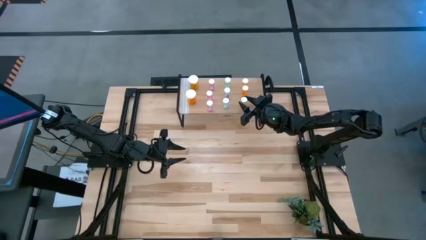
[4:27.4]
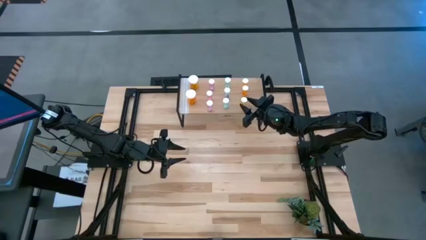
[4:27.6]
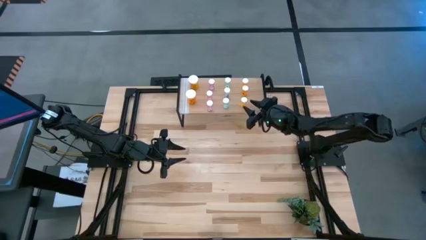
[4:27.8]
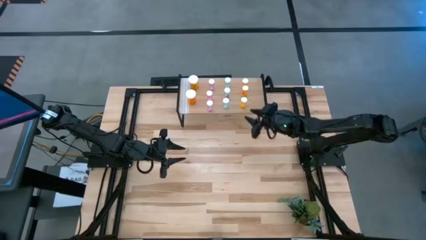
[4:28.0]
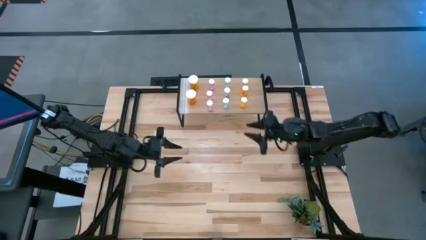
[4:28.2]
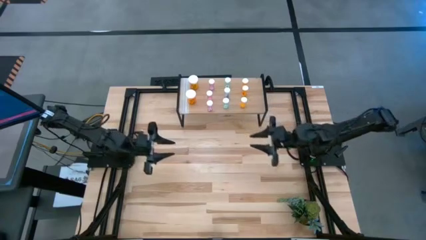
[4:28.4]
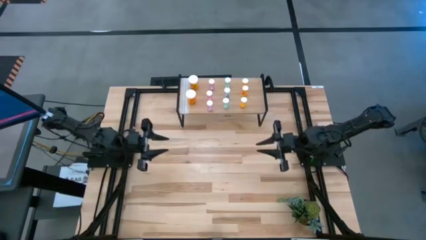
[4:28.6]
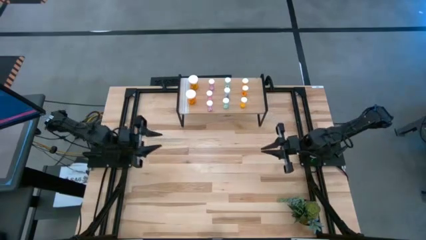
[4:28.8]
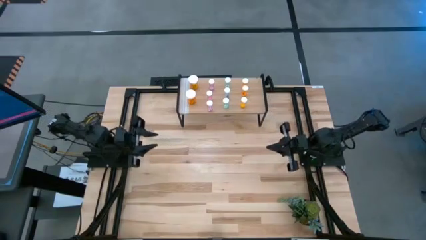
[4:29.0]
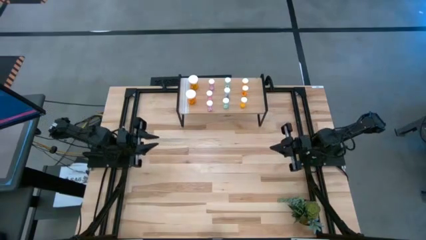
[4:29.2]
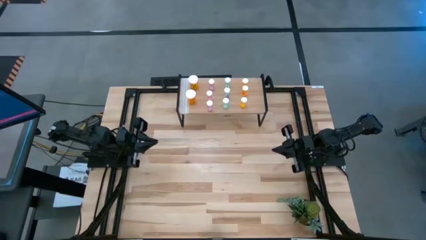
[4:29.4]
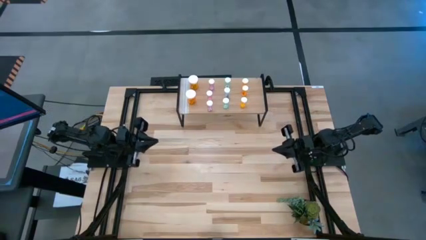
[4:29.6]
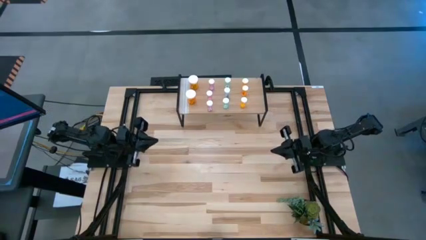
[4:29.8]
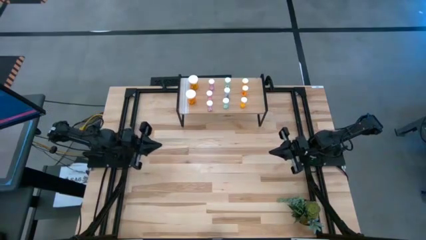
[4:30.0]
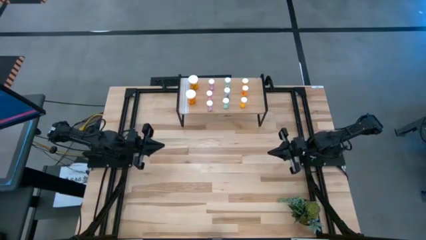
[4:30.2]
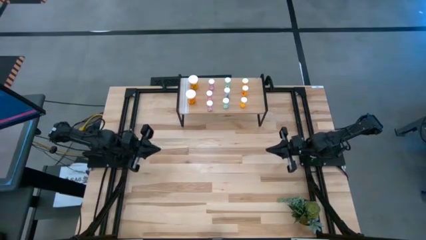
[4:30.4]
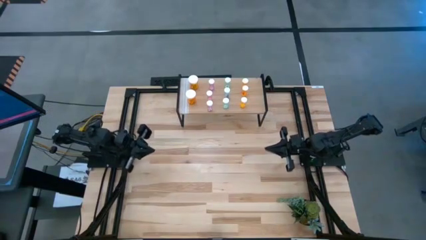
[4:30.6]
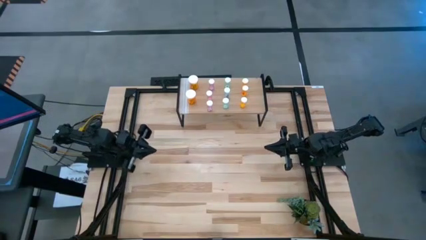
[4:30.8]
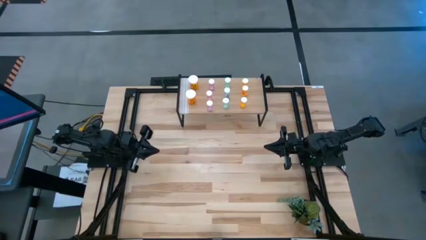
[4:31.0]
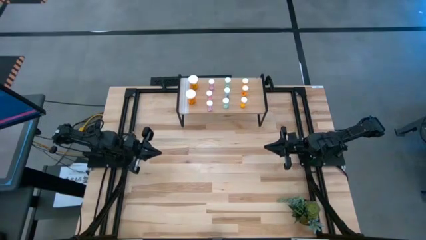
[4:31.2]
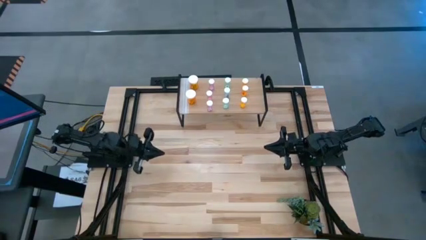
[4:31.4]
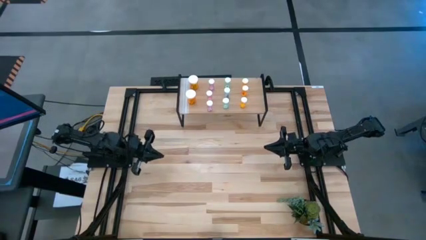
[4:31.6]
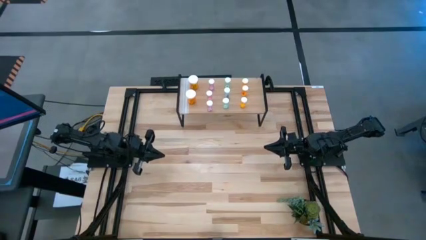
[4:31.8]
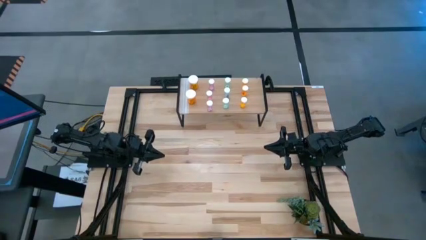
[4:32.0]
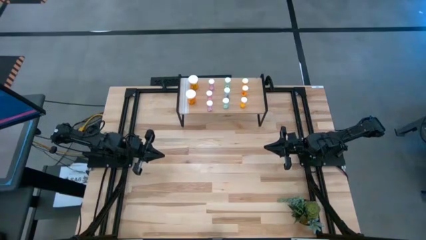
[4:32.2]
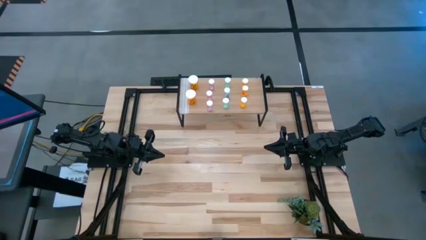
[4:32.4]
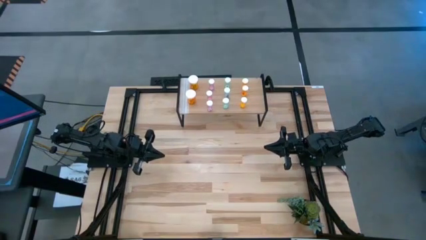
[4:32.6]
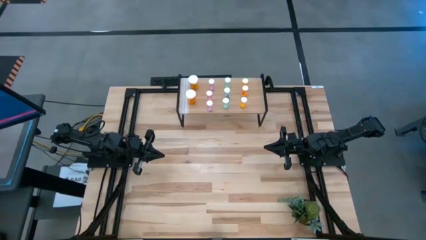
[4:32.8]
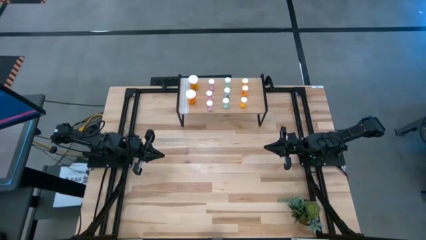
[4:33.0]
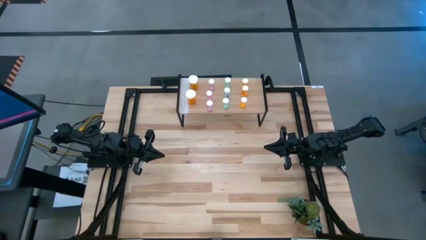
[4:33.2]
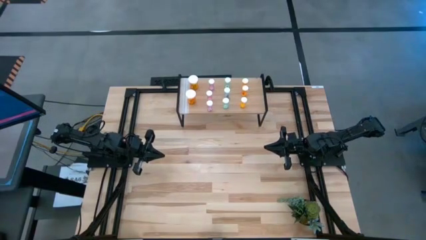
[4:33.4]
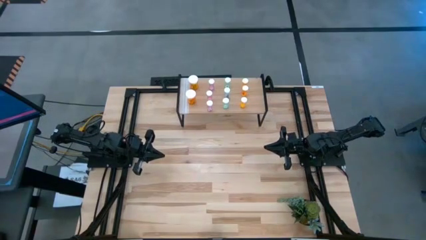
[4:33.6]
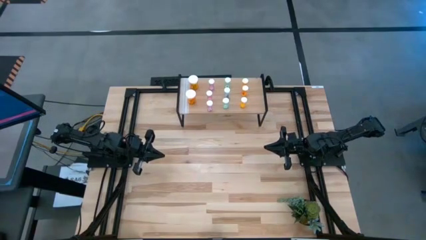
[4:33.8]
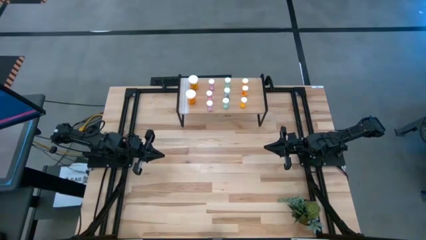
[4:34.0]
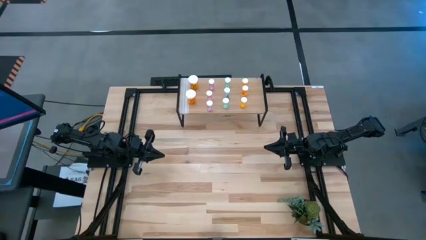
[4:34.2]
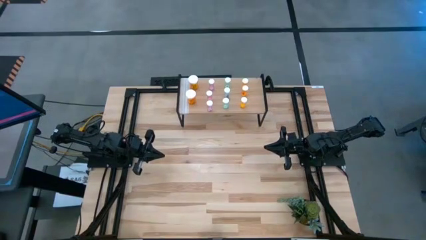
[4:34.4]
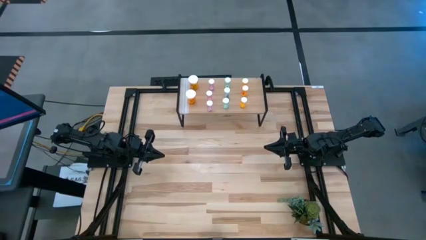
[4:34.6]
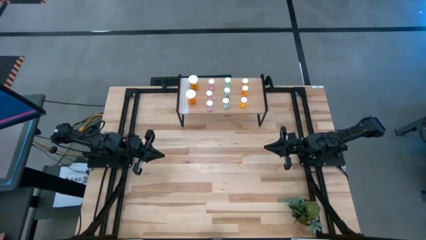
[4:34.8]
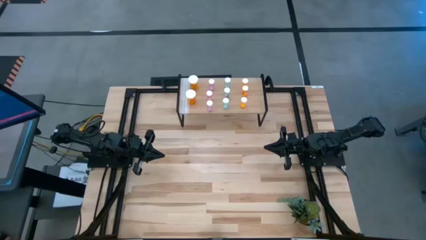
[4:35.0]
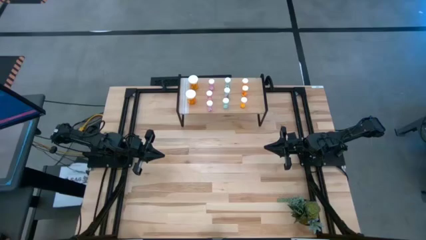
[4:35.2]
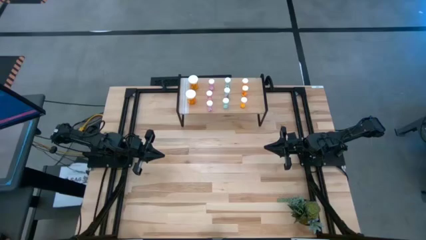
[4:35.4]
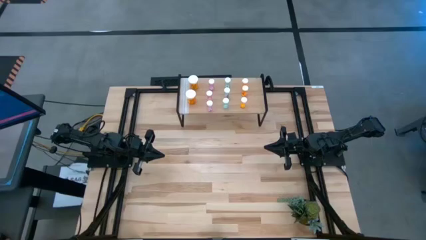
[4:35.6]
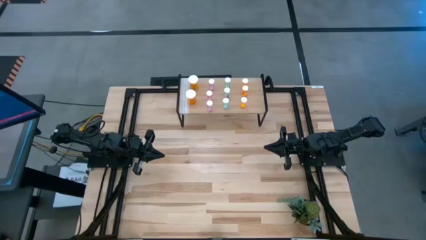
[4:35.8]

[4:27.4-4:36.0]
Task: Pick and place medicine bottles onto shelf by color
Return to Home Position

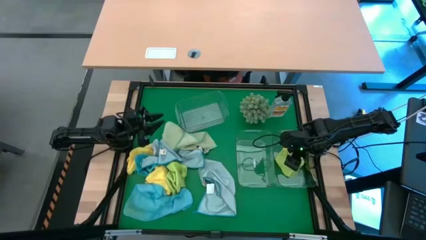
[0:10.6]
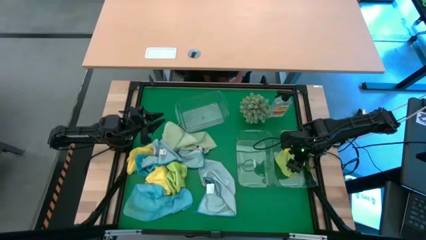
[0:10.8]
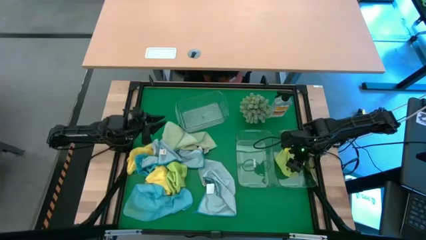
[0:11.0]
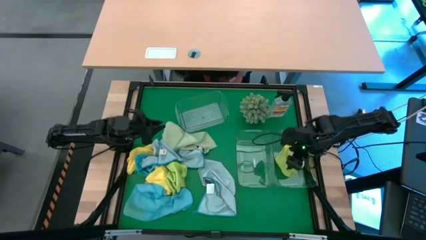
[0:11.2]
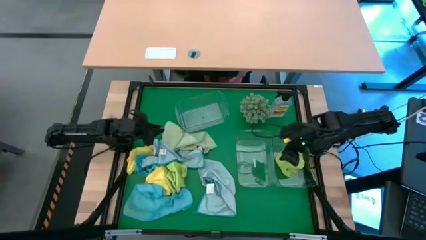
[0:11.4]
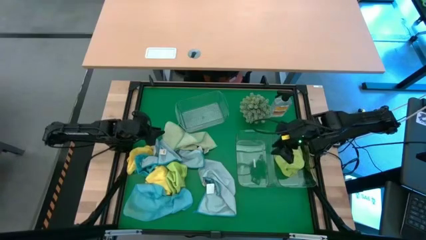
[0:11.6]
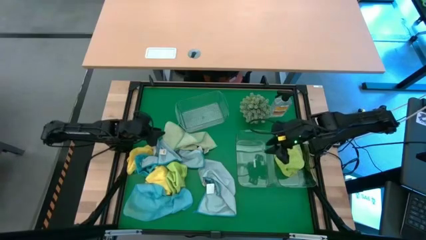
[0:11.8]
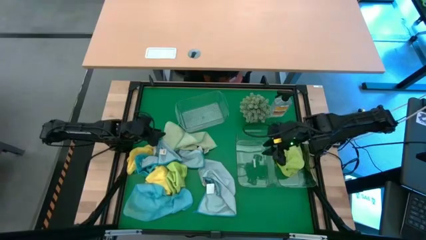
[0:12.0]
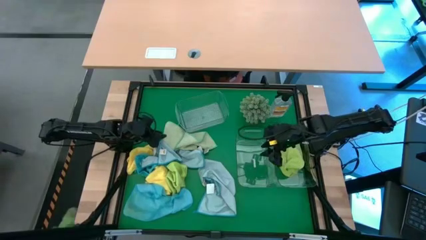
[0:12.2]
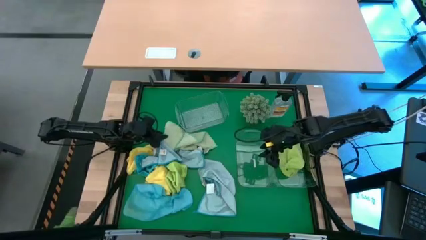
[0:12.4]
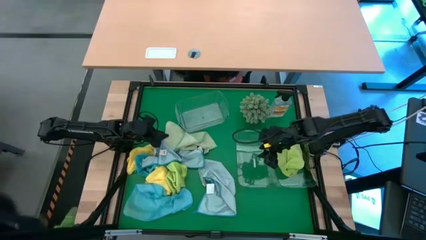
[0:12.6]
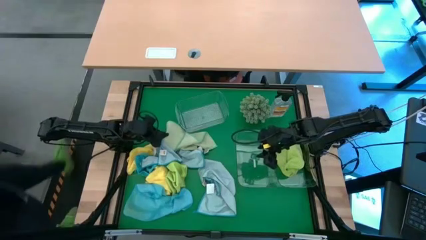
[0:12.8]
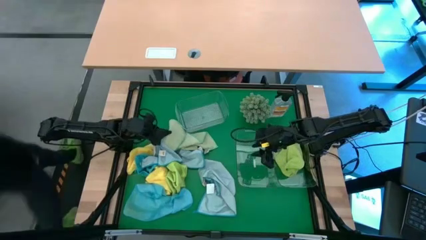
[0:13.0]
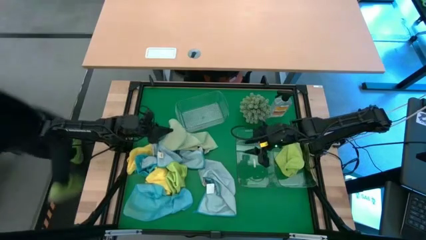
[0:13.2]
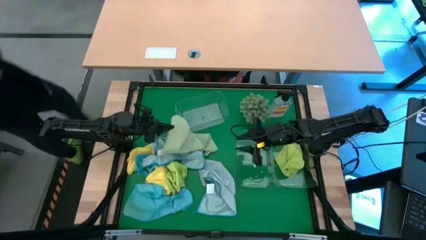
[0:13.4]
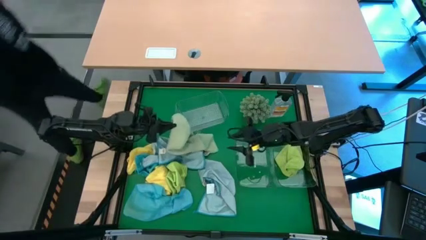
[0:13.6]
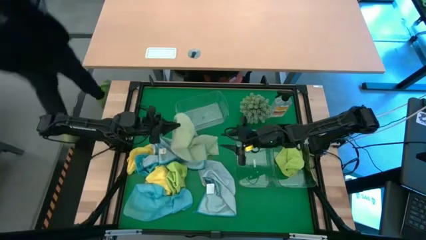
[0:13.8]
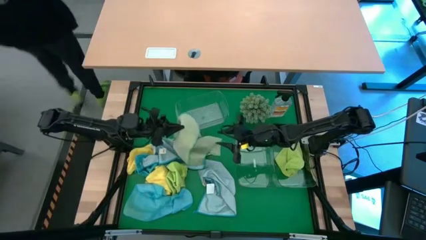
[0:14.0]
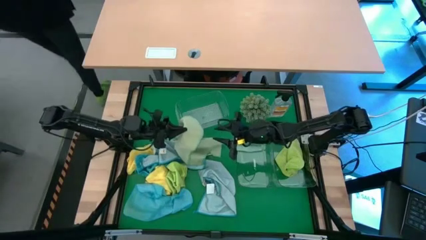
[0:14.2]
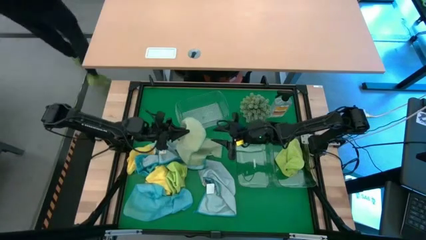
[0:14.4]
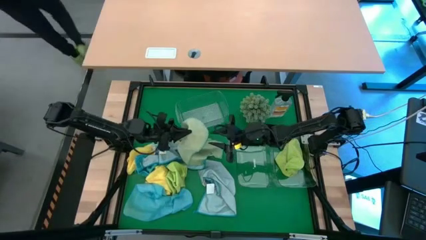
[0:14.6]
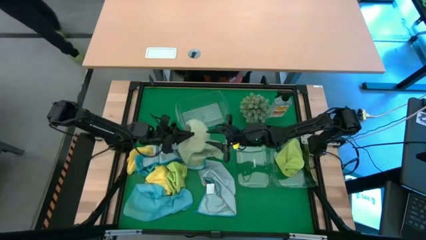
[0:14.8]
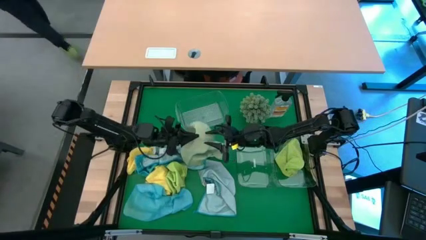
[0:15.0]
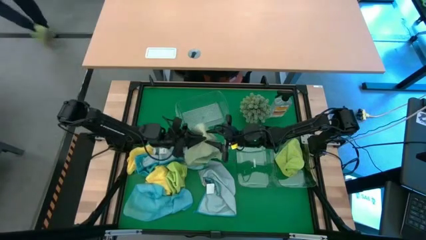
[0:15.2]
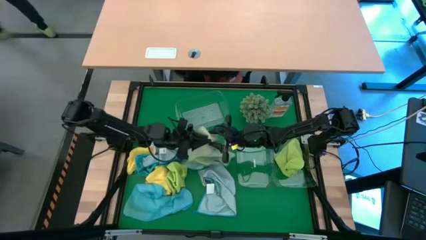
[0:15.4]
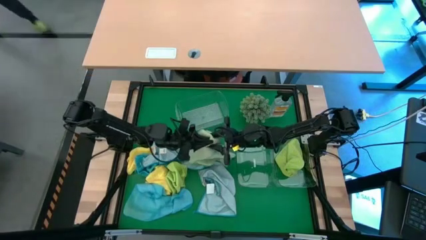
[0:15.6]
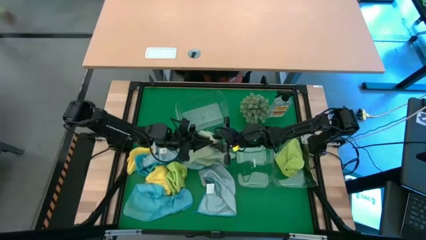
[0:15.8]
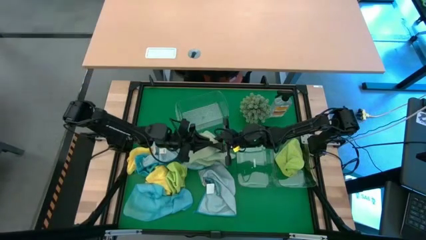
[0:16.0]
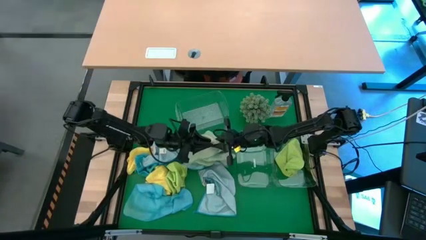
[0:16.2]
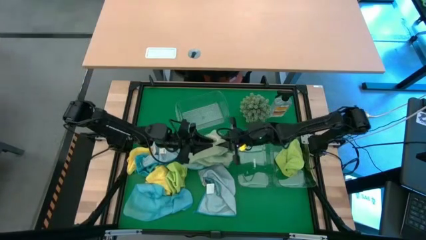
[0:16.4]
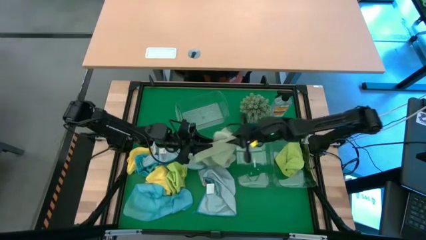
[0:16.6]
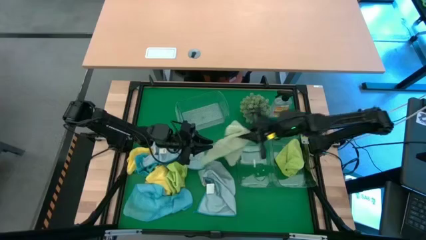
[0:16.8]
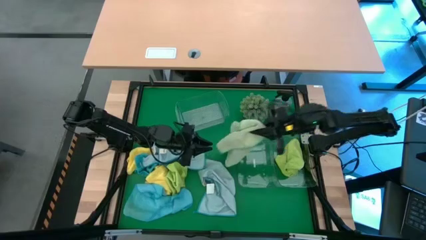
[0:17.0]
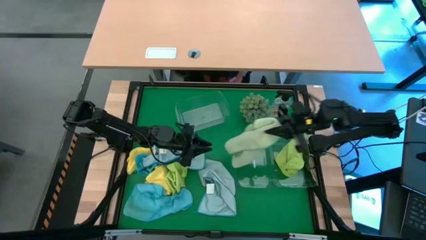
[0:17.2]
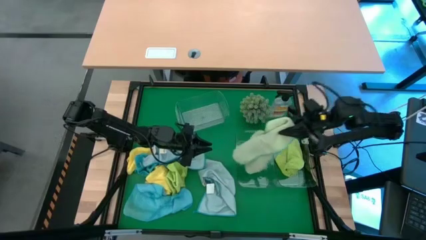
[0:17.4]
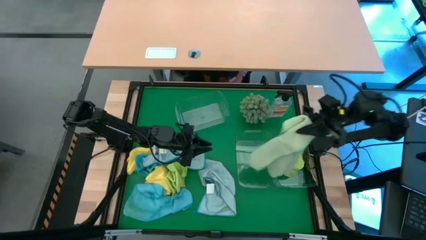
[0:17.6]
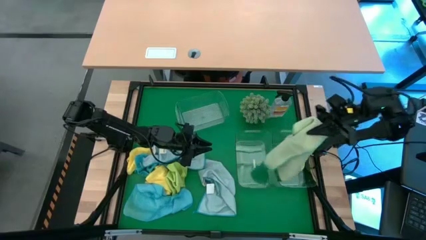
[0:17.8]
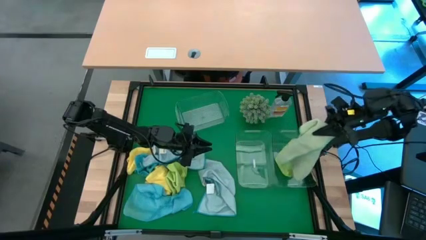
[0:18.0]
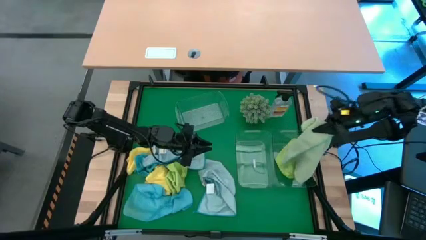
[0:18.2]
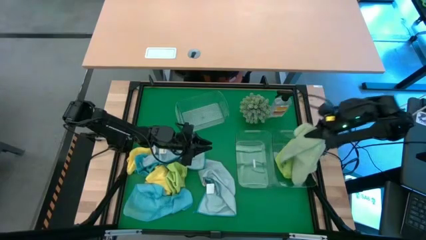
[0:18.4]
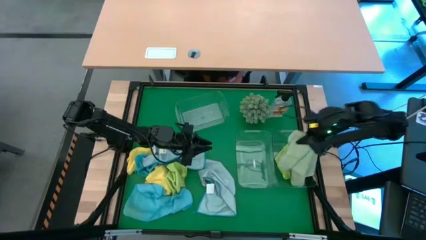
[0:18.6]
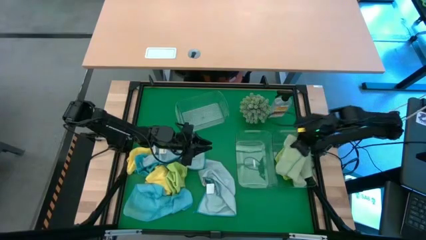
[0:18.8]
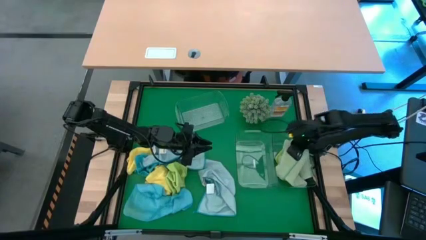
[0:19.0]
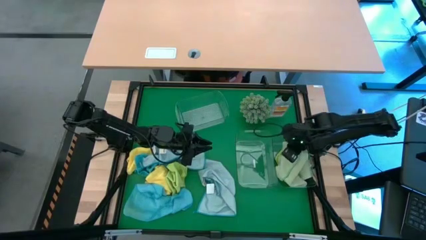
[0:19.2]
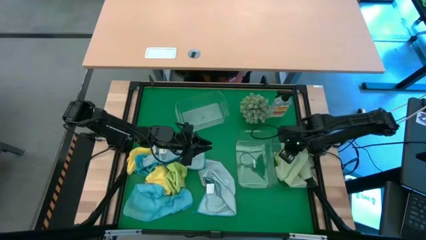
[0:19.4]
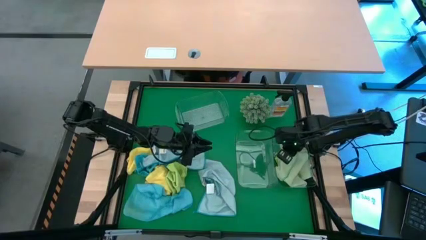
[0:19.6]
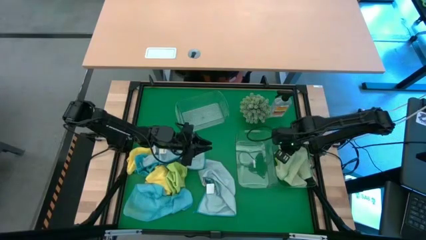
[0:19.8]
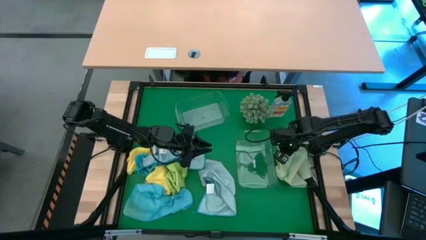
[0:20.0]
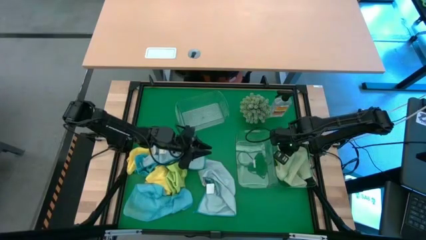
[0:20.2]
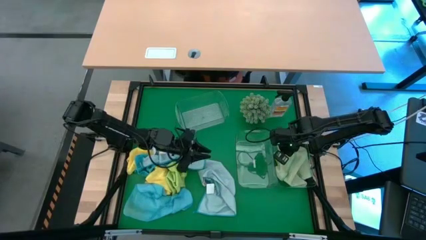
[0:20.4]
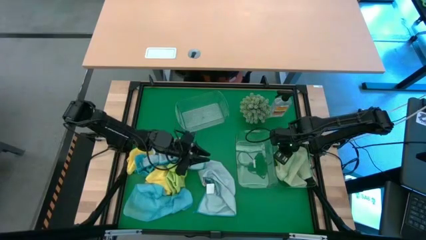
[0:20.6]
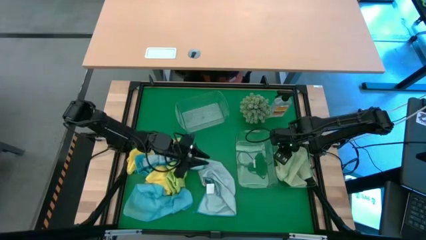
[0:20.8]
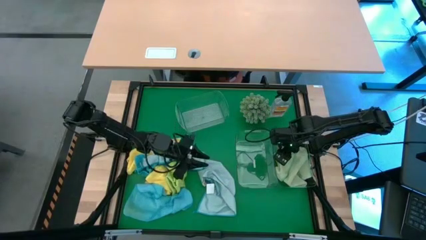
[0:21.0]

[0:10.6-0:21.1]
Task: Sort microfiber towel by color & place in baskets
Put the top green towel into the bottom right transparent bin
